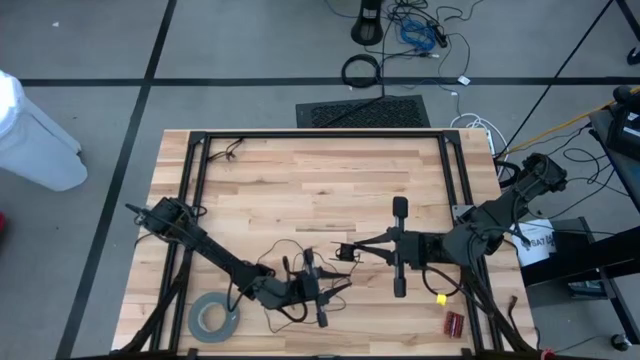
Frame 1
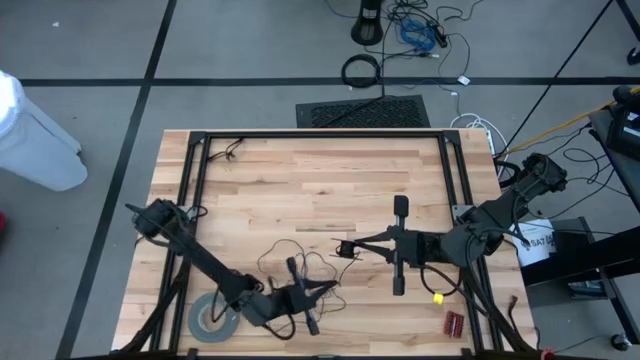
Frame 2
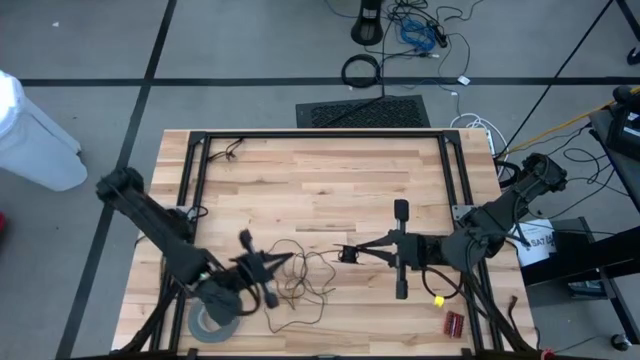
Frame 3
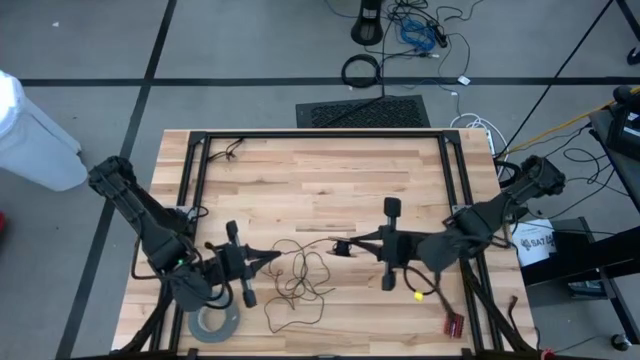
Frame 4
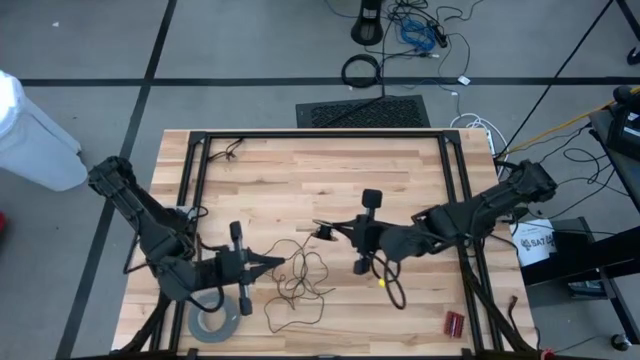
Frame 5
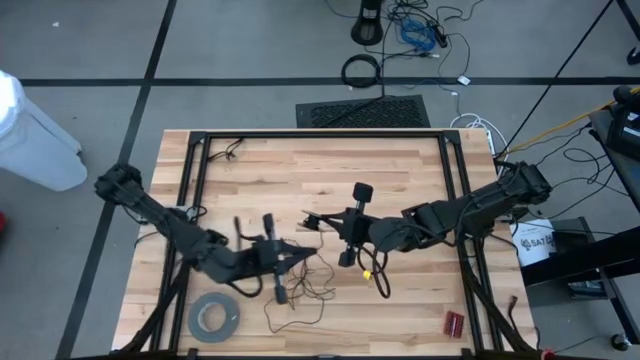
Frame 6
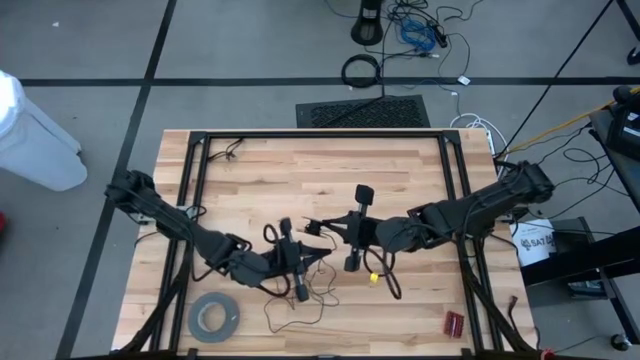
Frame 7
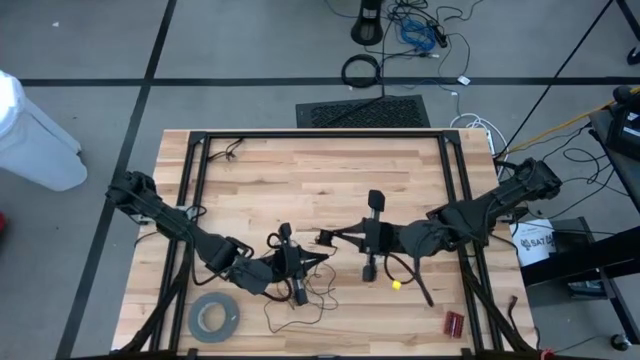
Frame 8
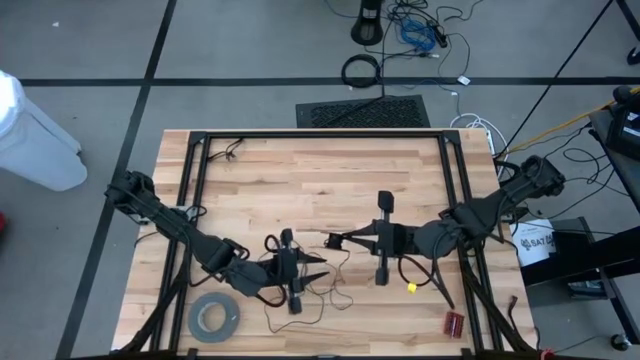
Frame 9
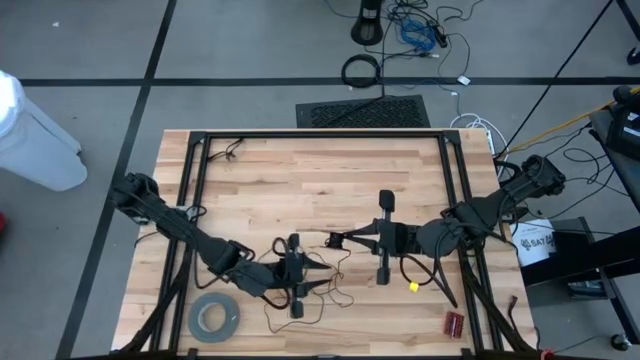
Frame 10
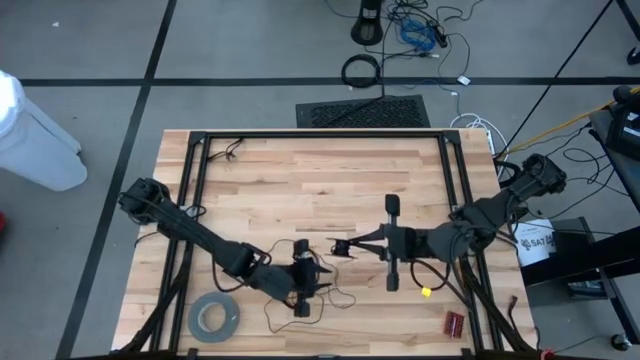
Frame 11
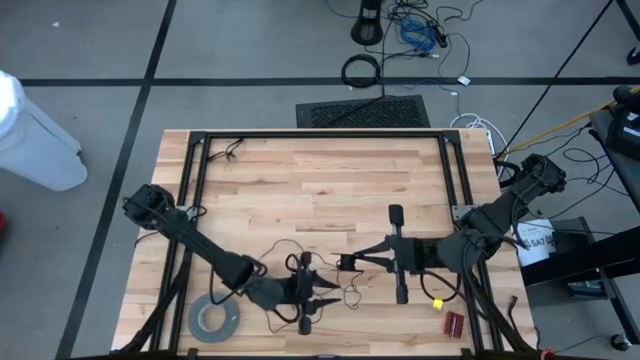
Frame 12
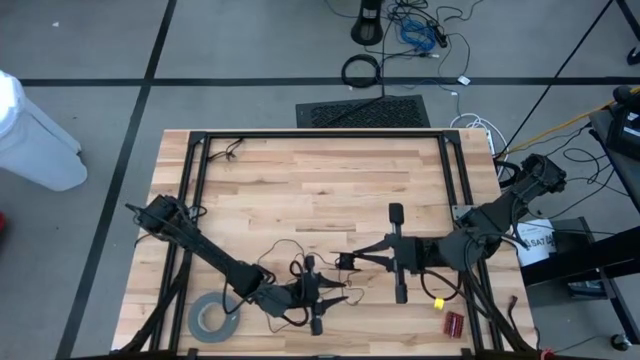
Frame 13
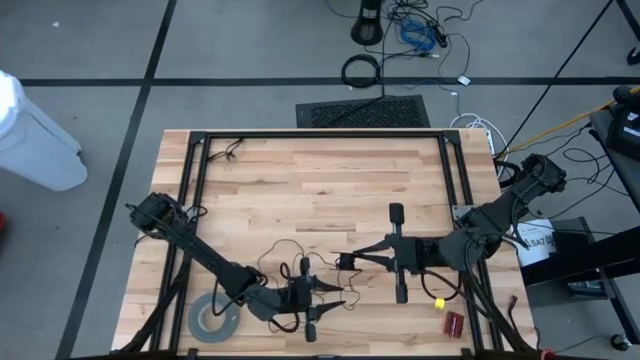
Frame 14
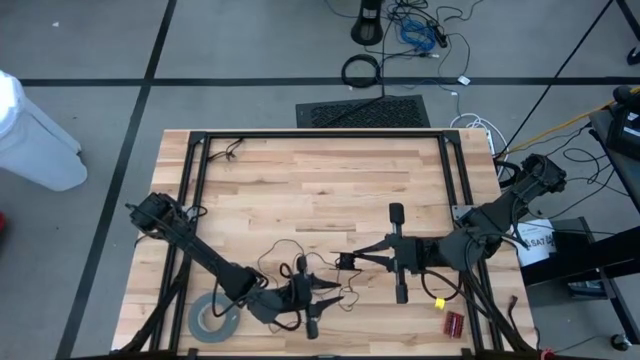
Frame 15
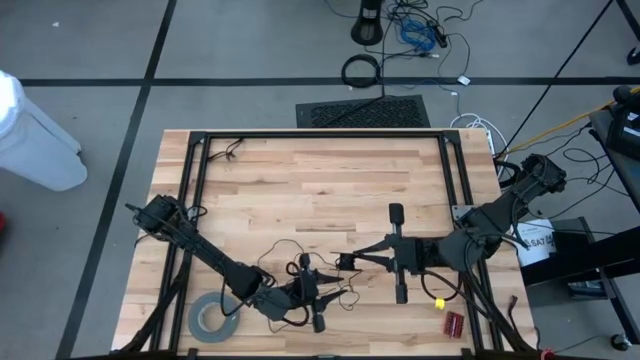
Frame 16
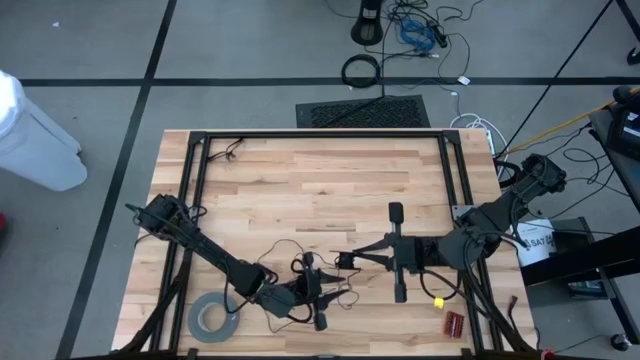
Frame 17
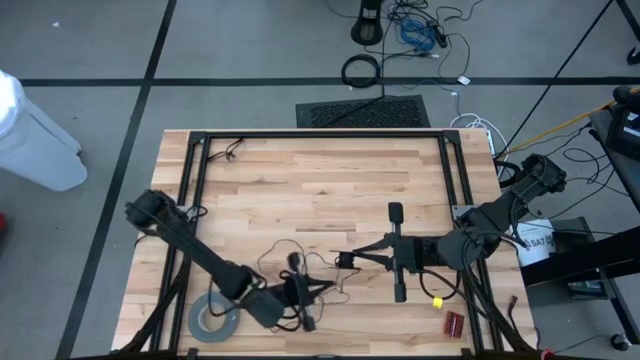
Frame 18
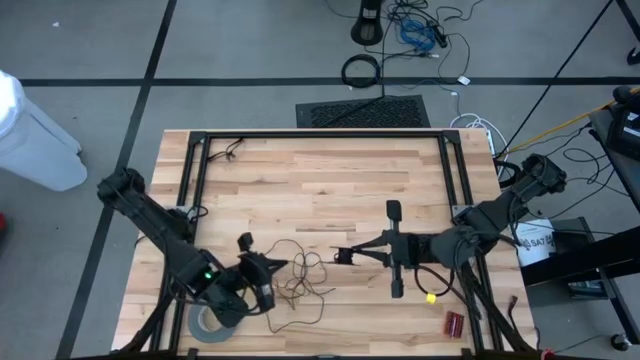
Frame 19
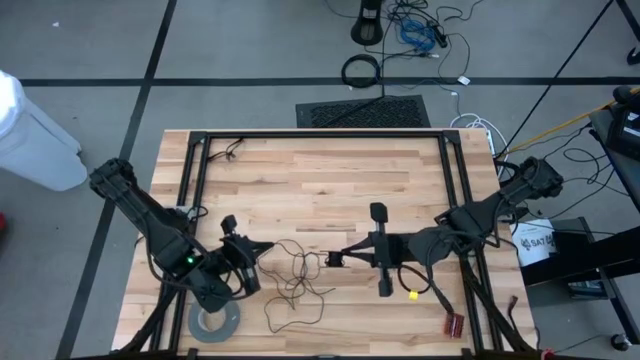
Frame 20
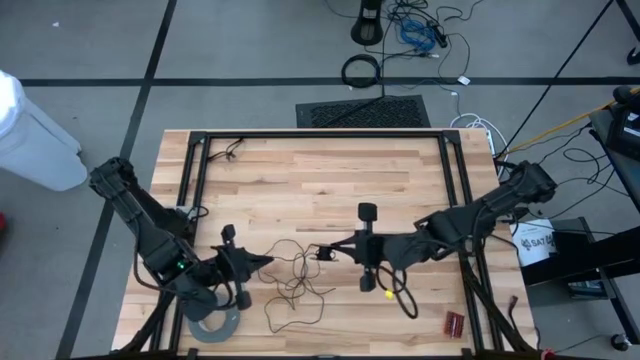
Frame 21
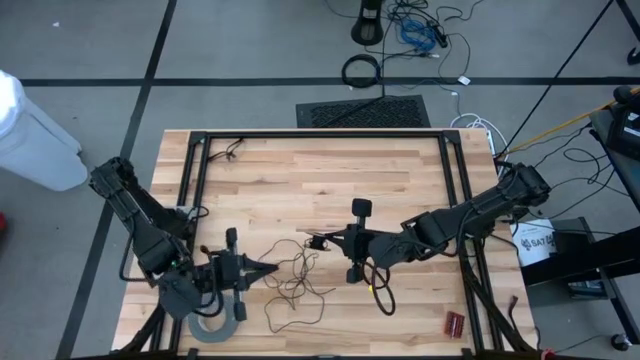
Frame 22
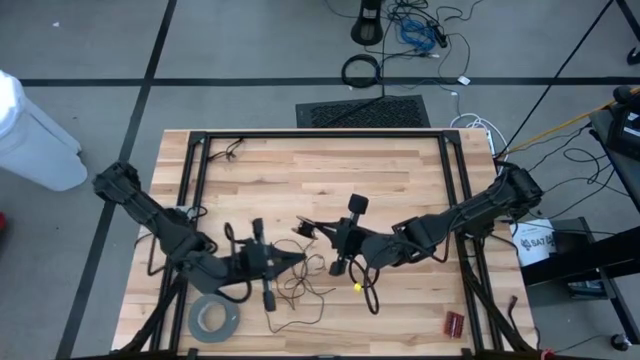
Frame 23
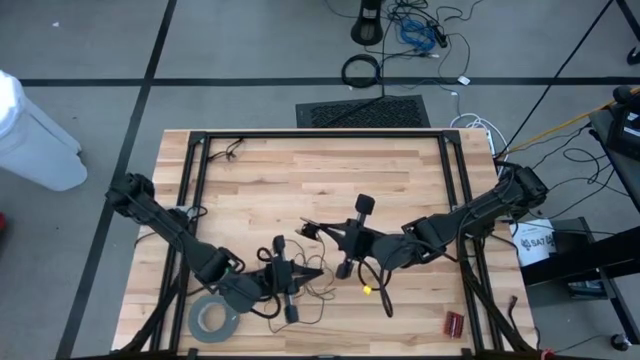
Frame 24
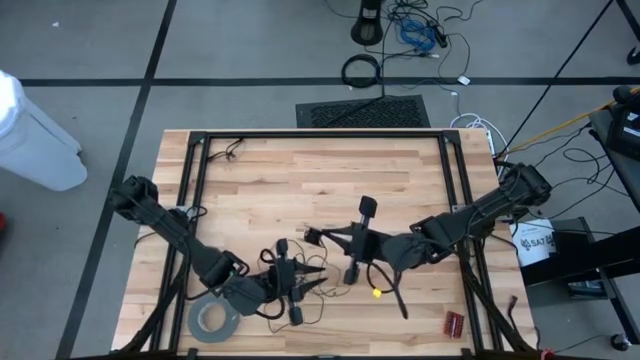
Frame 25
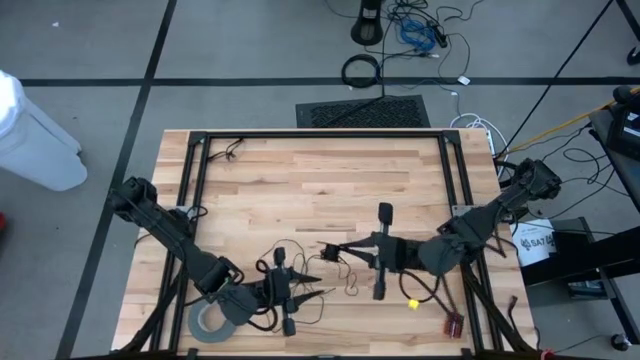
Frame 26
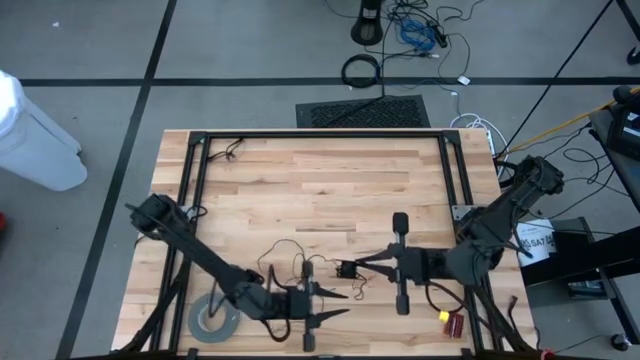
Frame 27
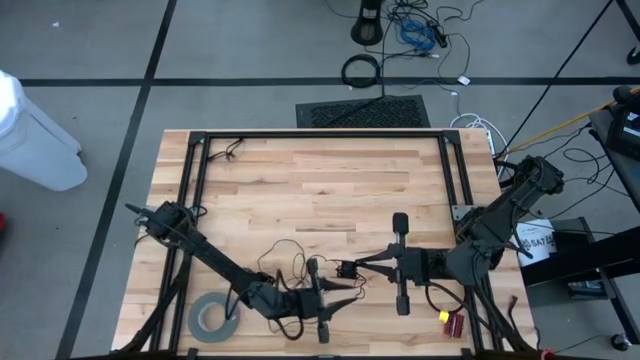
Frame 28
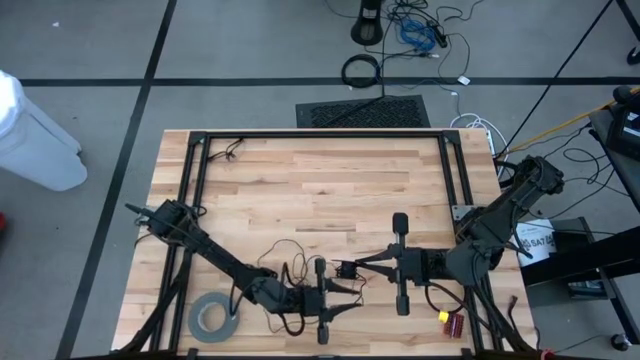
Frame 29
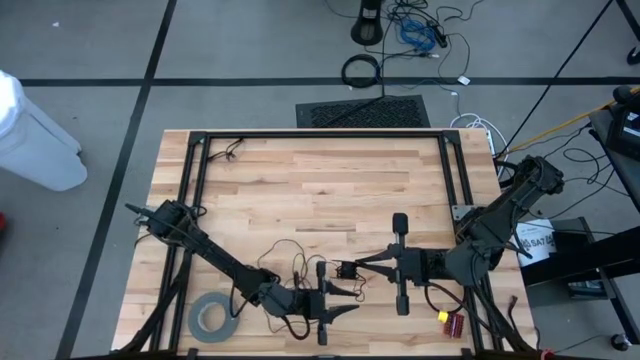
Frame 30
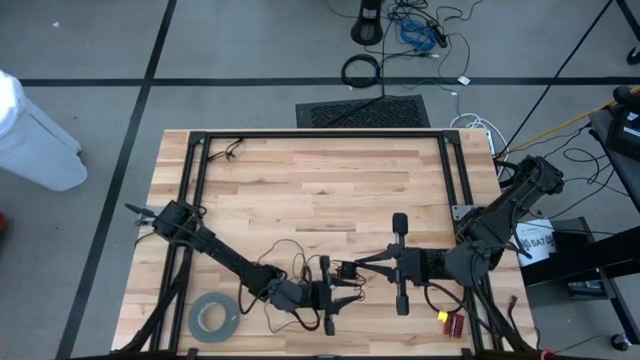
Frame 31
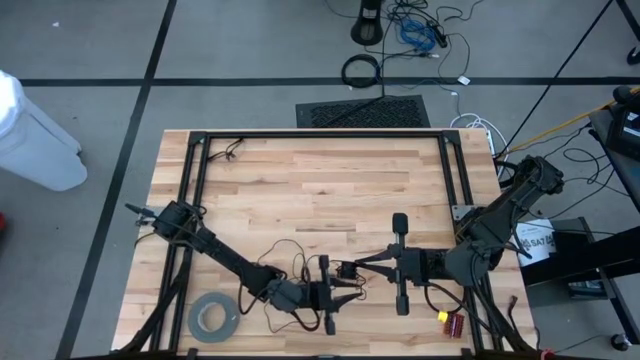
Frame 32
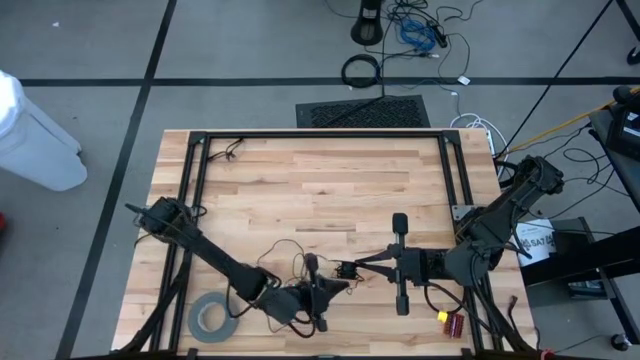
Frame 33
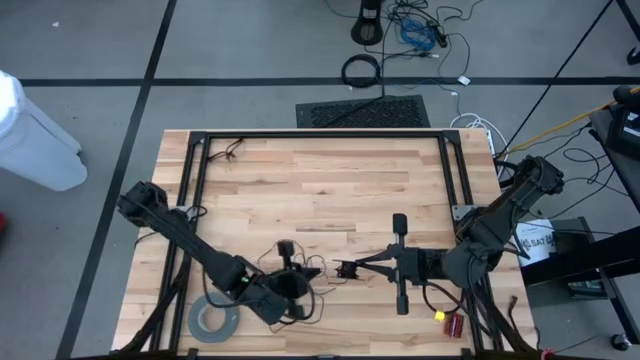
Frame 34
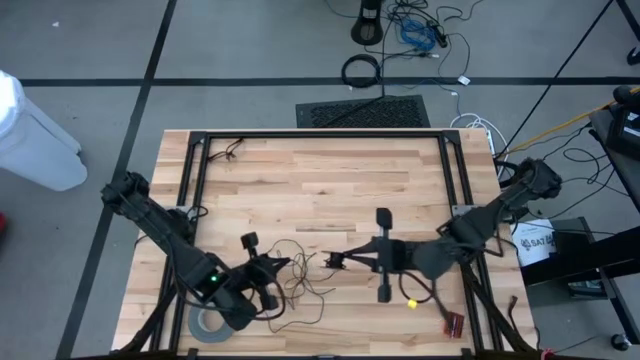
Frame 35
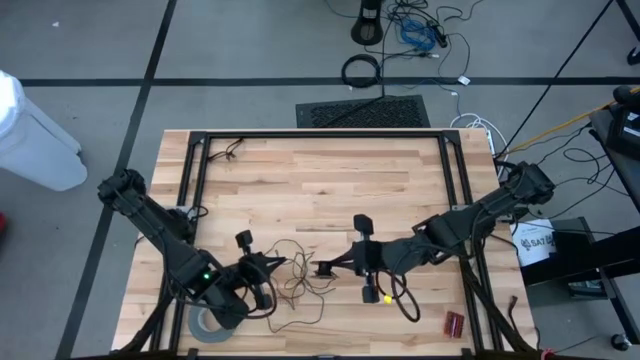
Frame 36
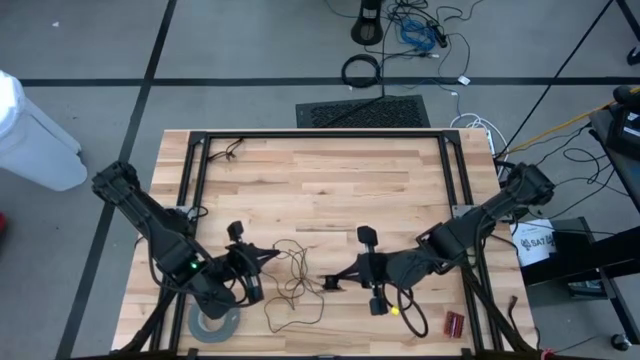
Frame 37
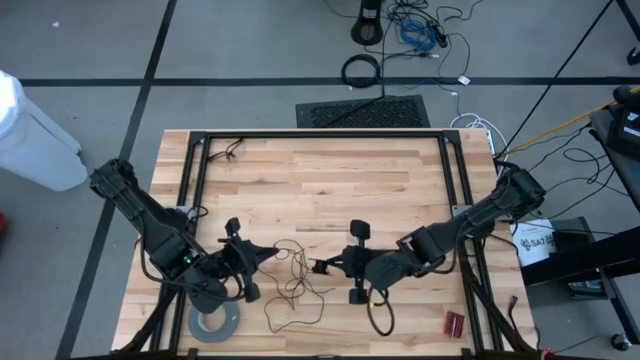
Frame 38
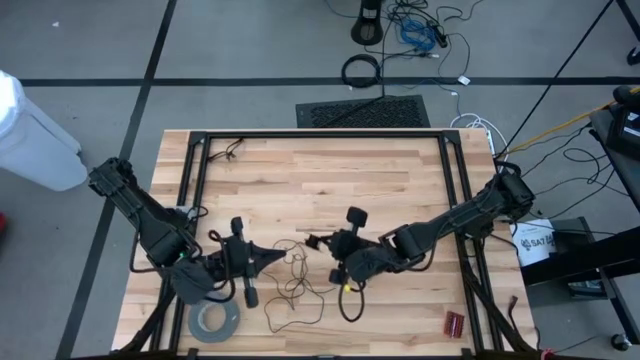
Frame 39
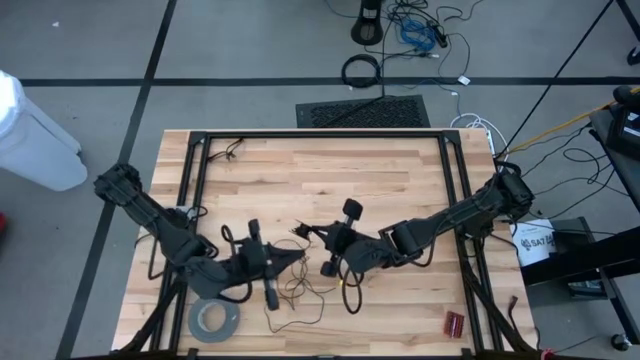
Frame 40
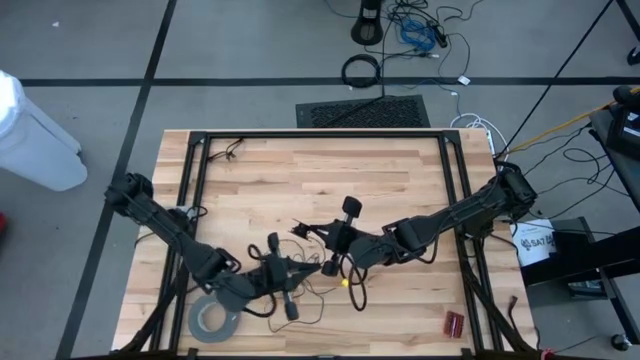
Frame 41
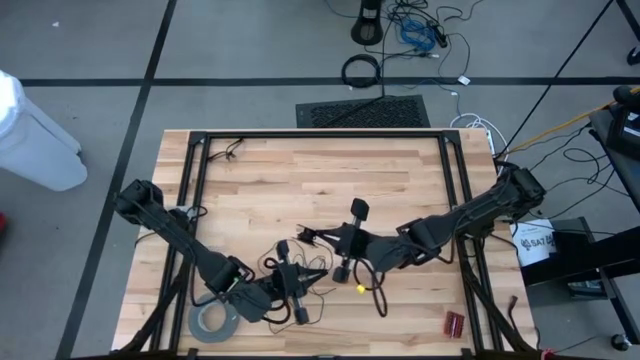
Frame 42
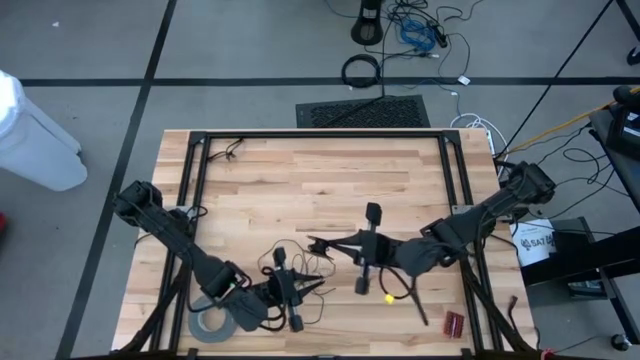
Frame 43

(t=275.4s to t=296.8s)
Task: Coil cords
Coil the black wire onto the spool
